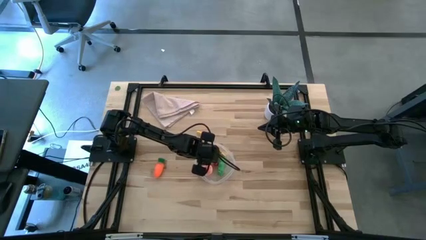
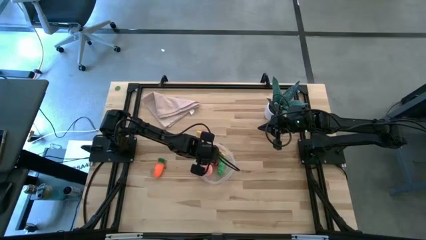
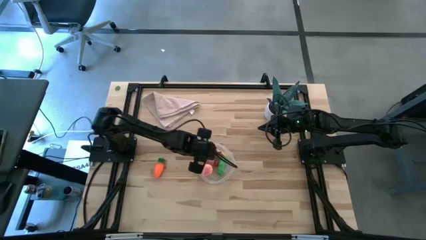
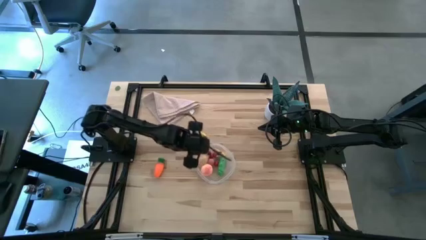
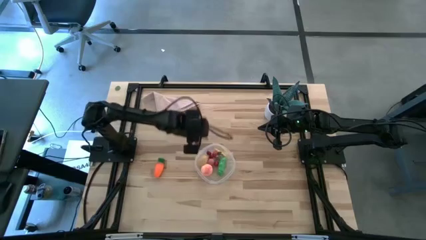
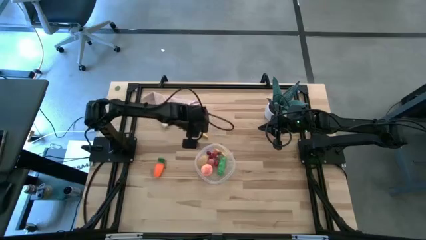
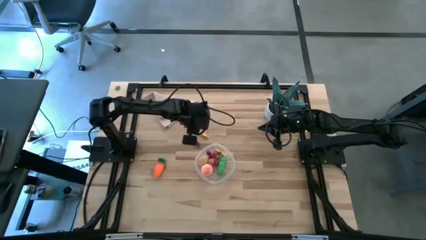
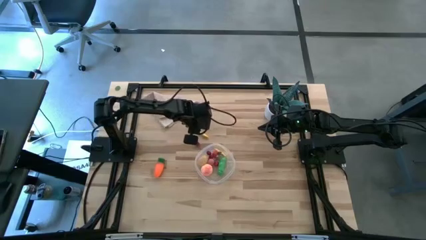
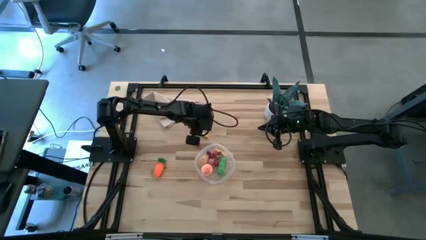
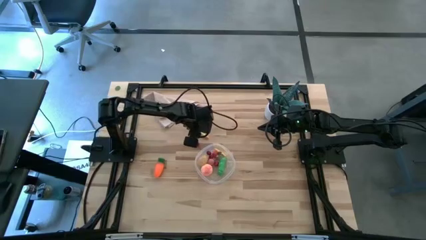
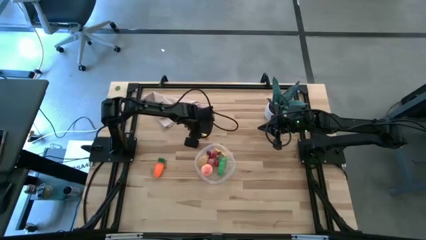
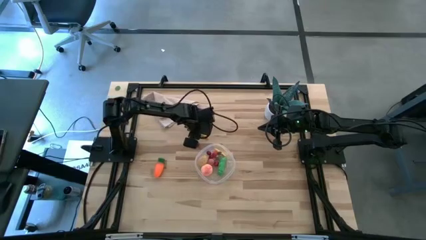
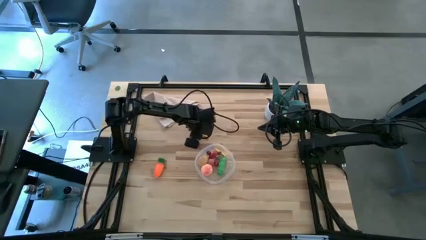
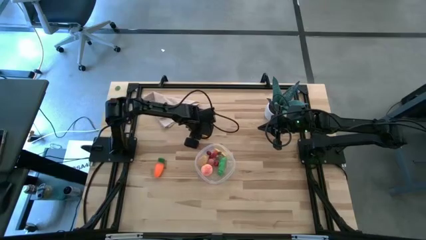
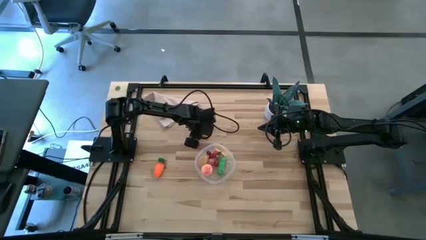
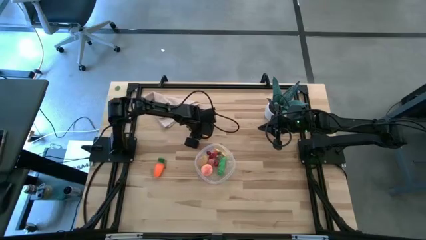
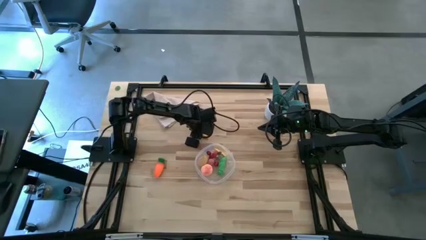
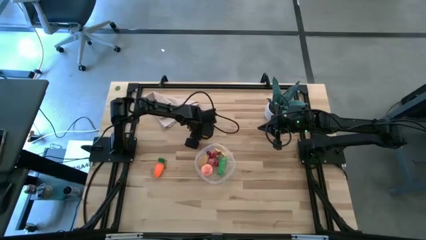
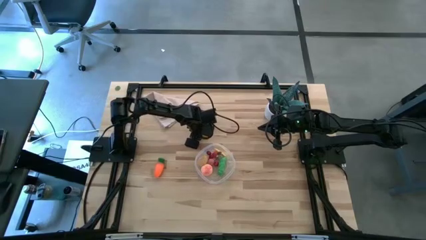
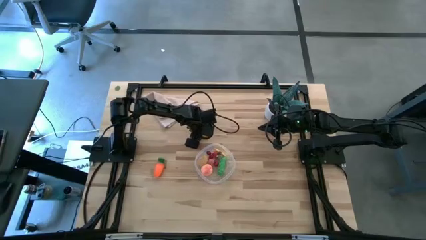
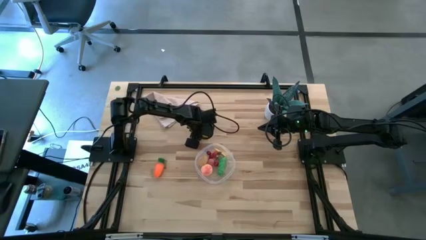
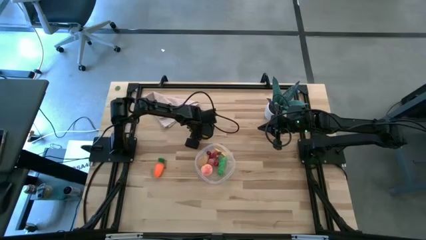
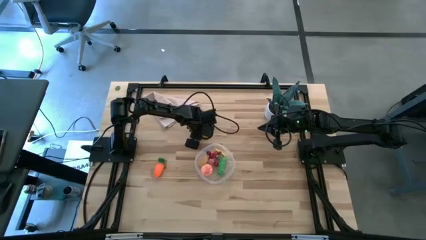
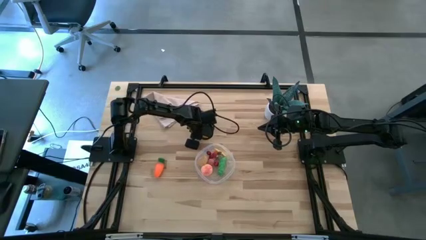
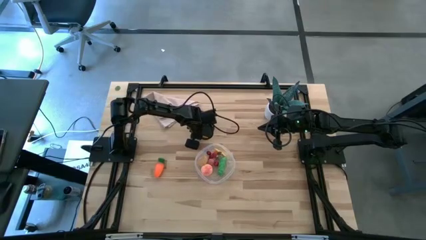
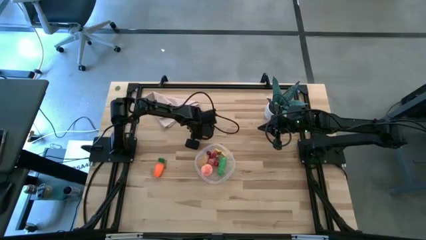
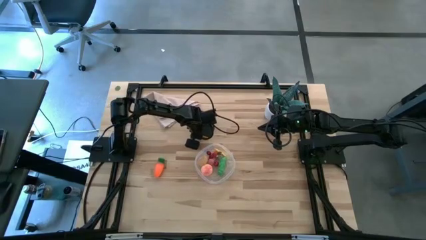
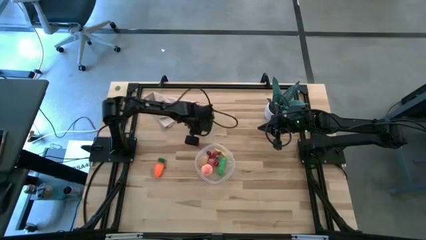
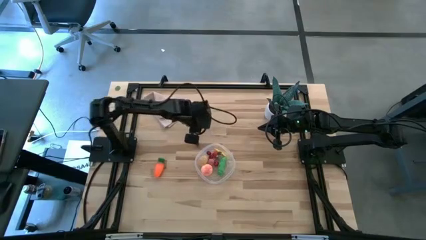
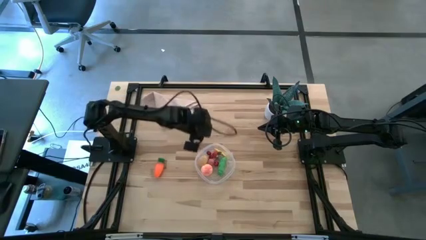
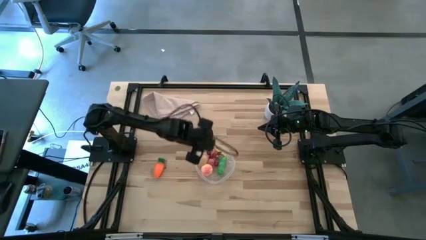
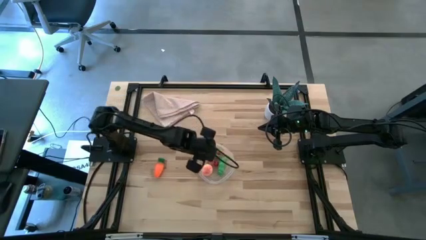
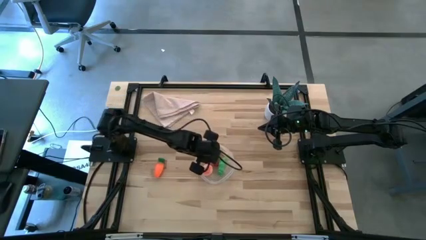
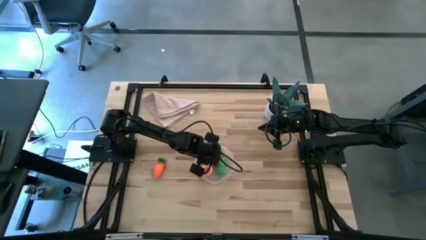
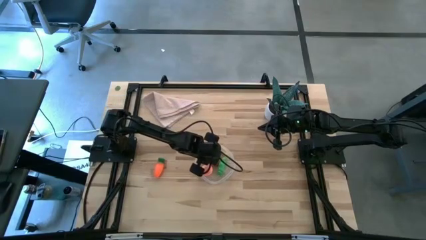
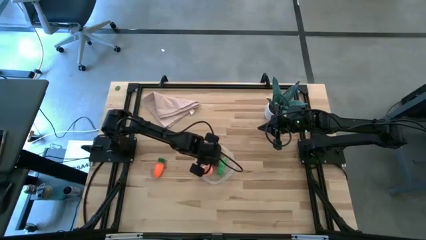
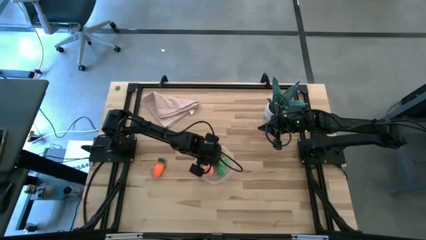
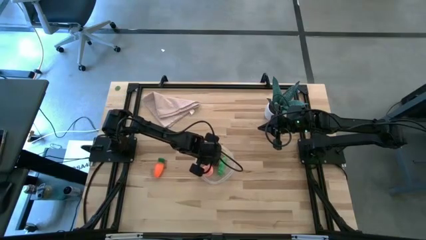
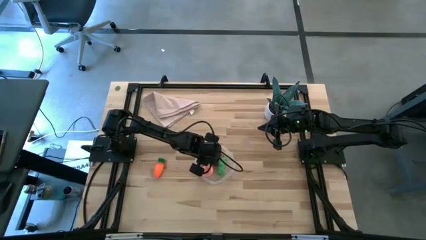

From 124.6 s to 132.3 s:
Task: Pick and placing Produce into tupperware
Put the corn into the transparent bin

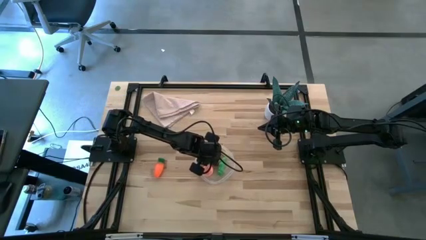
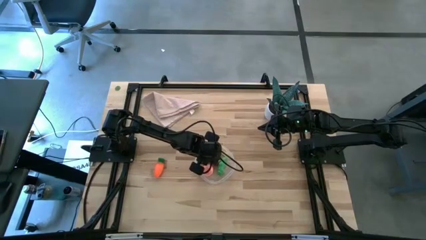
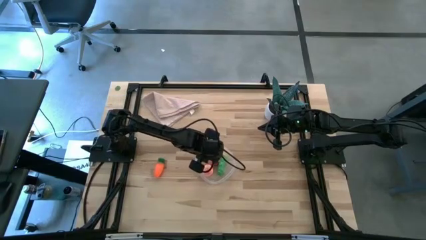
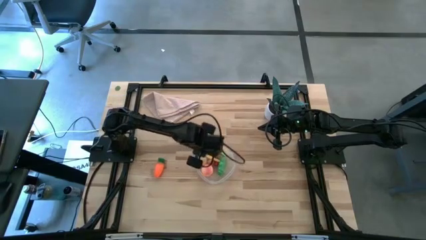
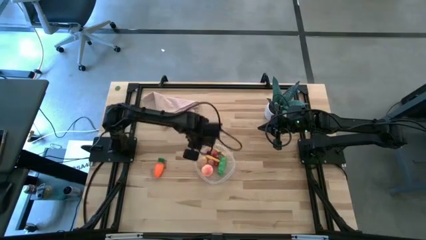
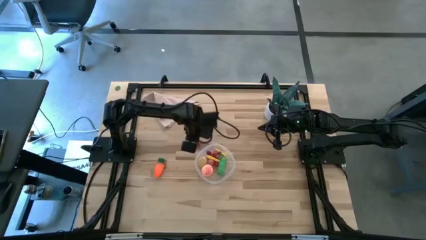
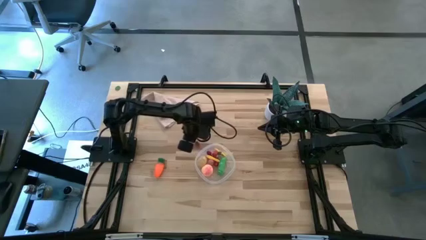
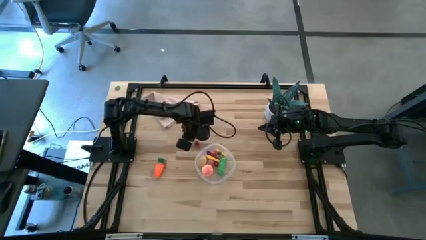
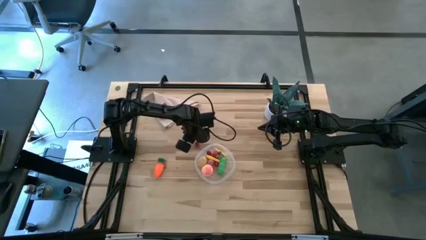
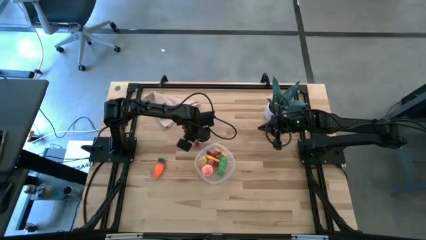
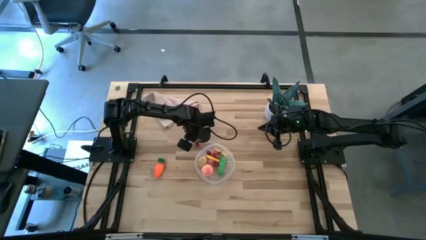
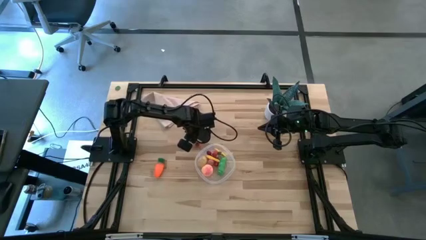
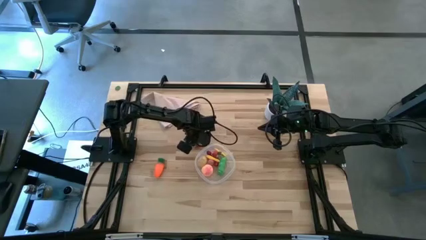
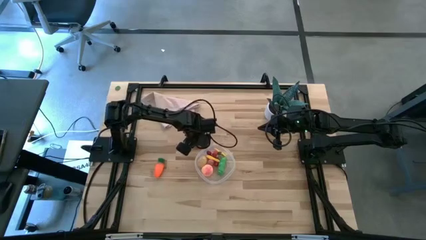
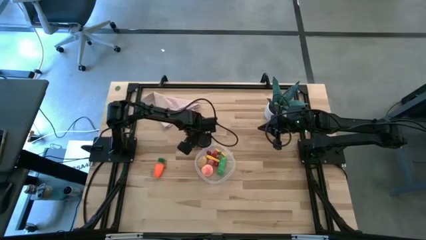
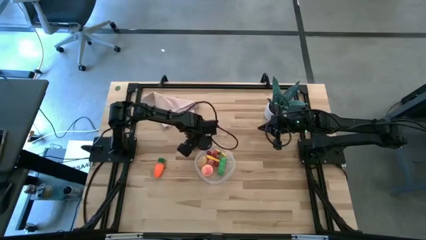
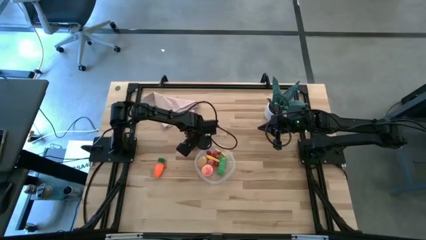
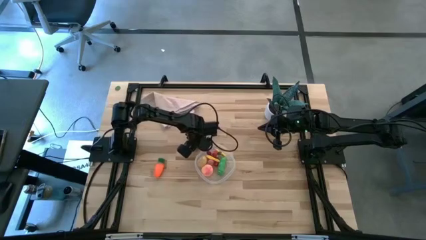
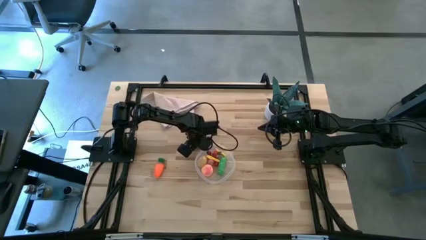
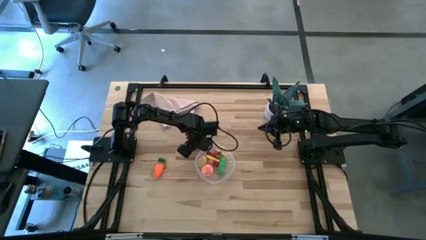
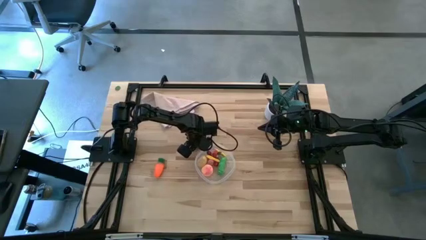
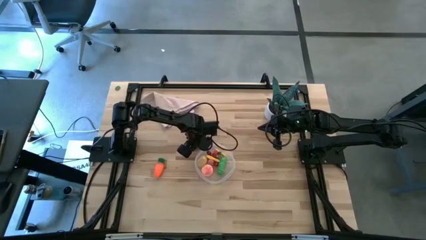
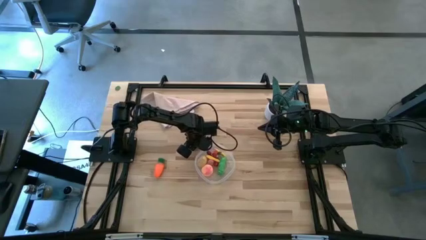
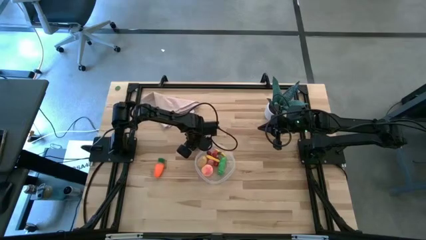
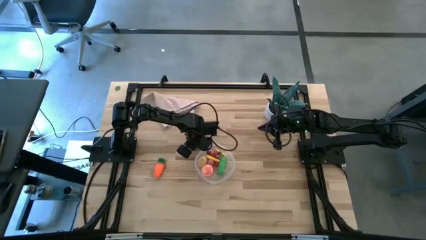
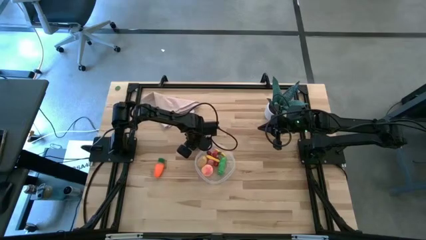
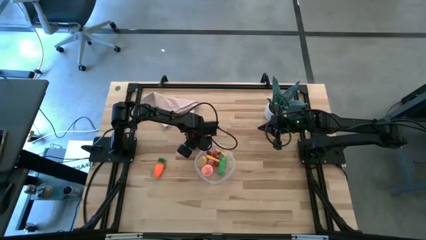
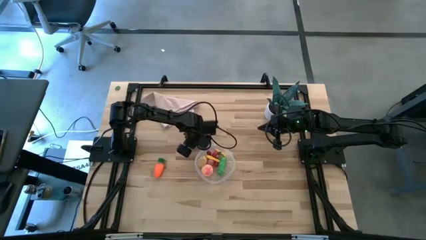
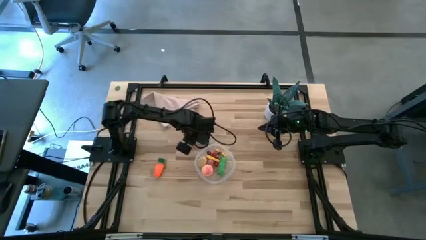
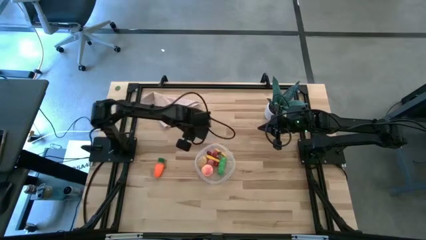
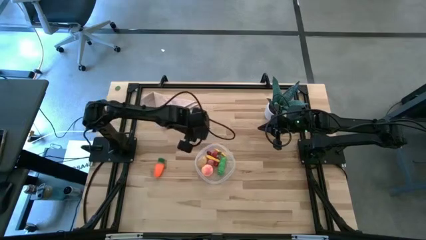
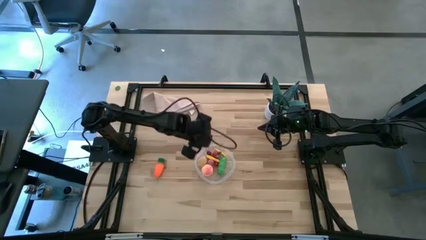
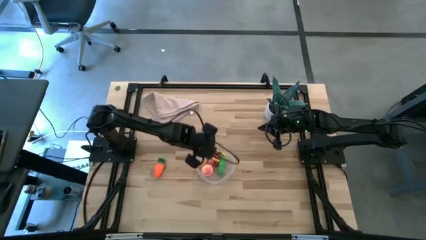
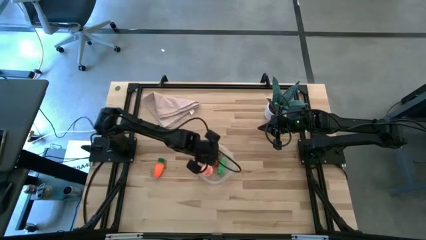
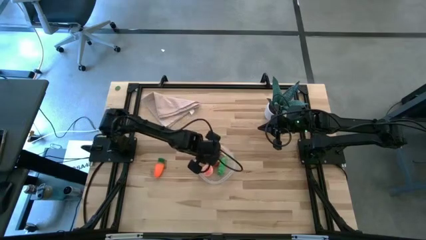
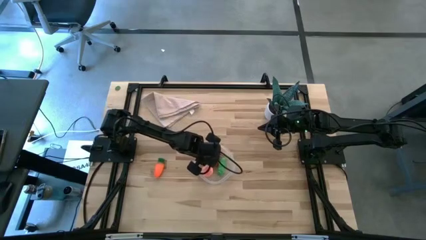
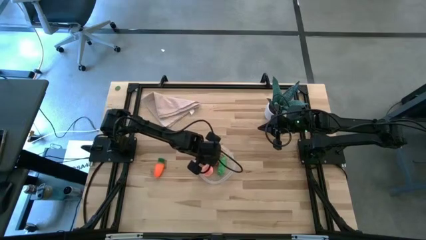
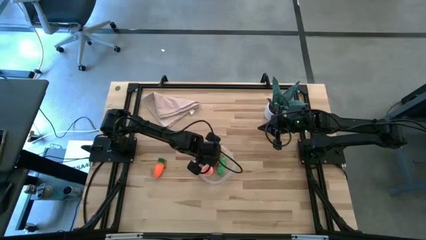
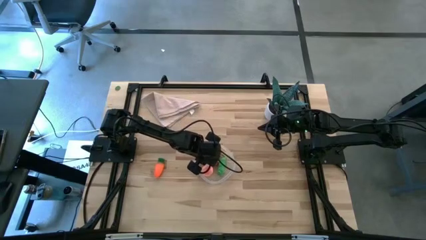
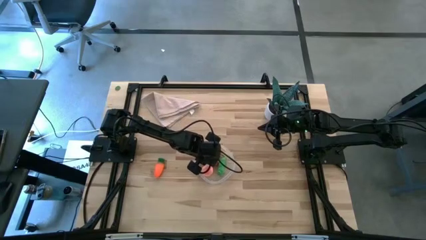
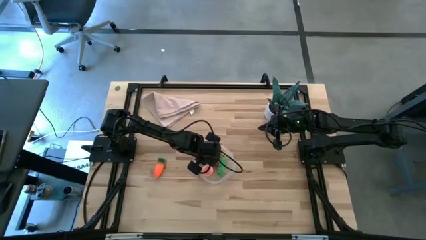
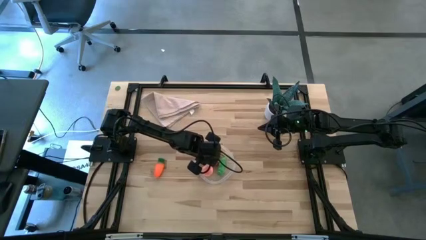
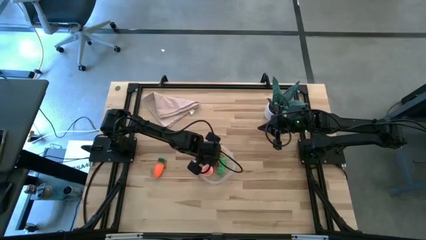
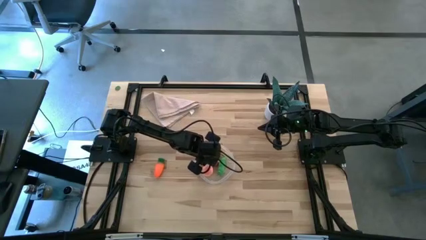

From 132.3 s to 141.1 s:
Put the red cherry into the transparent bin
